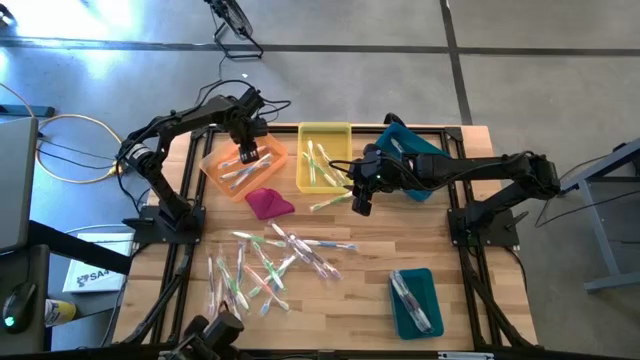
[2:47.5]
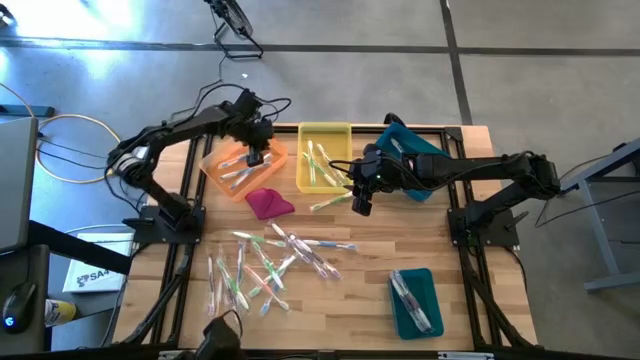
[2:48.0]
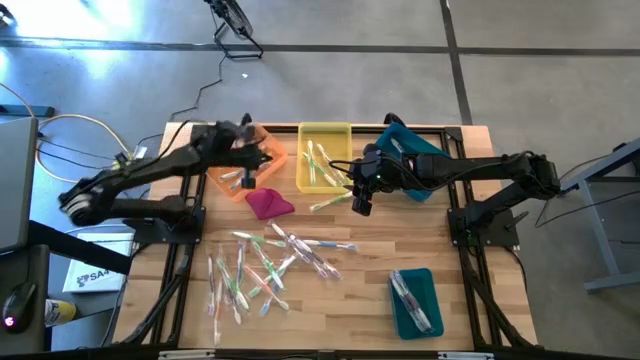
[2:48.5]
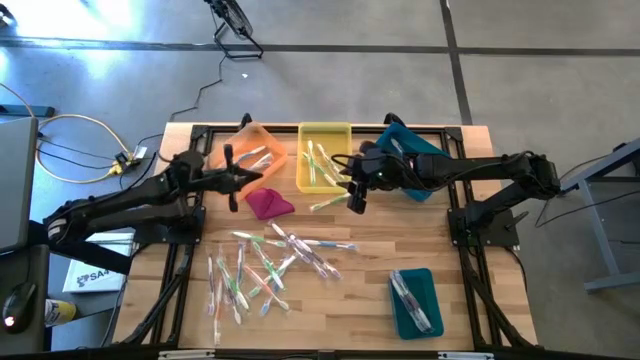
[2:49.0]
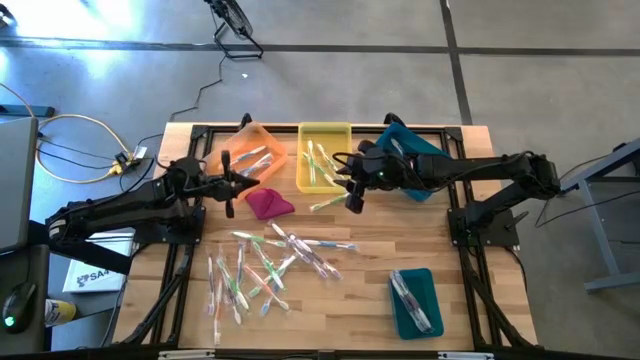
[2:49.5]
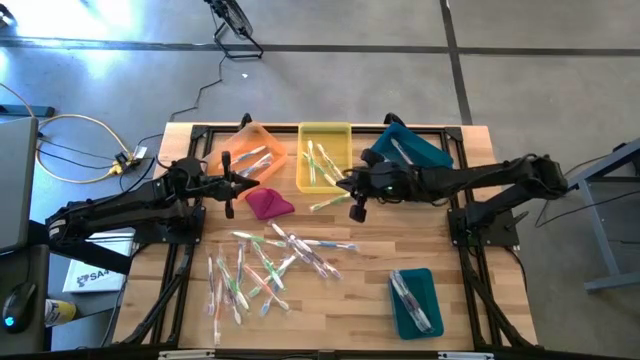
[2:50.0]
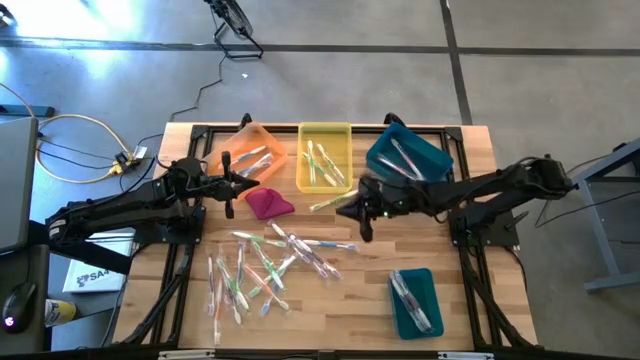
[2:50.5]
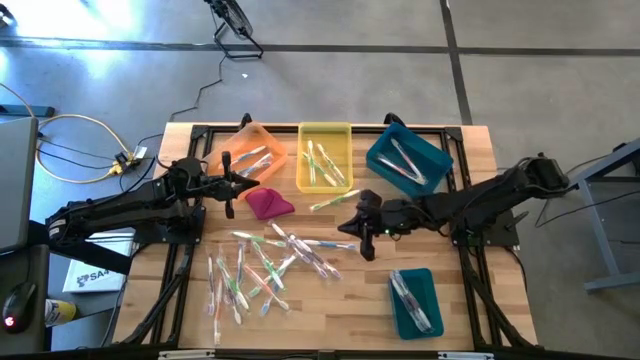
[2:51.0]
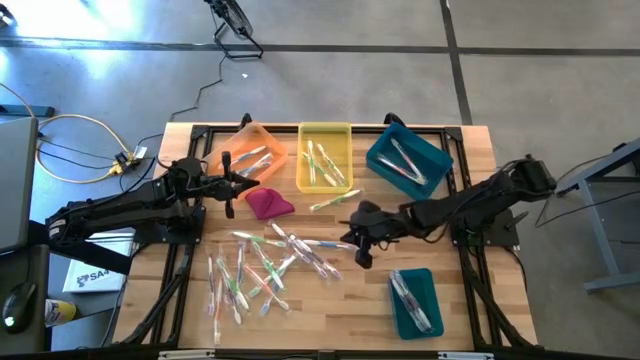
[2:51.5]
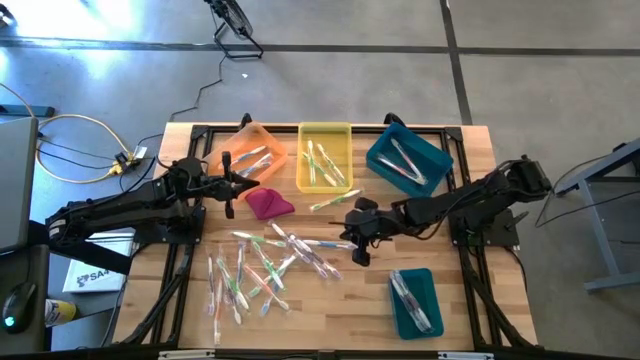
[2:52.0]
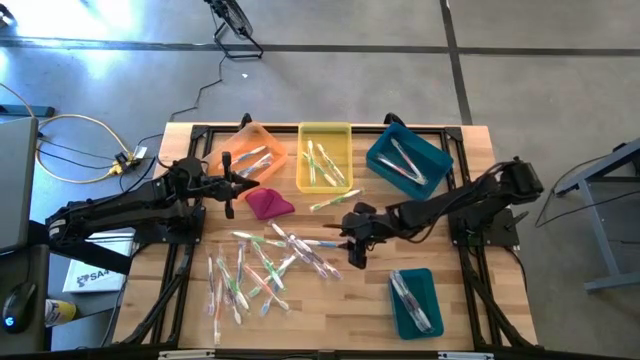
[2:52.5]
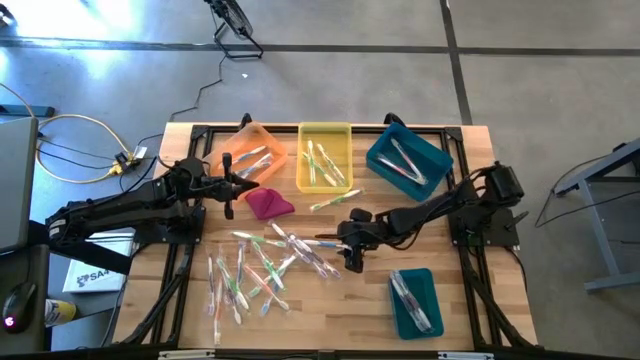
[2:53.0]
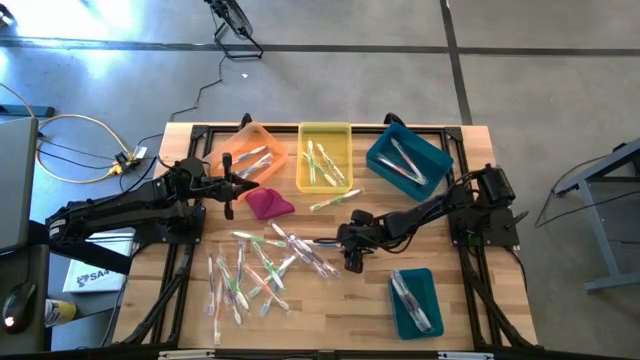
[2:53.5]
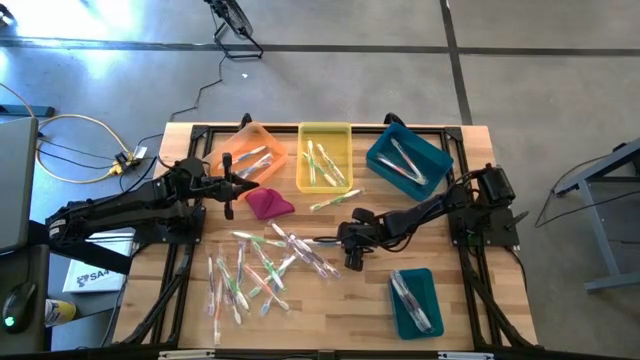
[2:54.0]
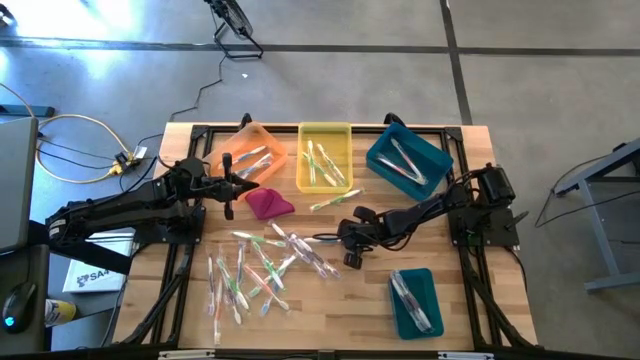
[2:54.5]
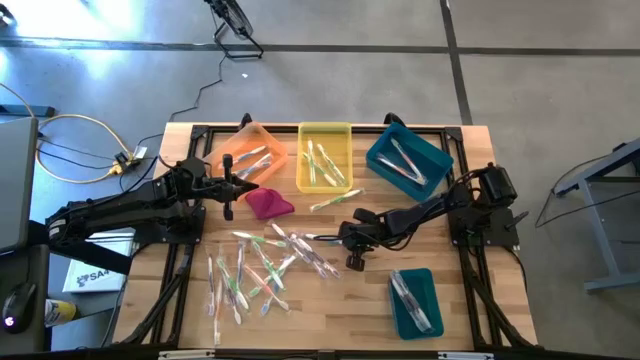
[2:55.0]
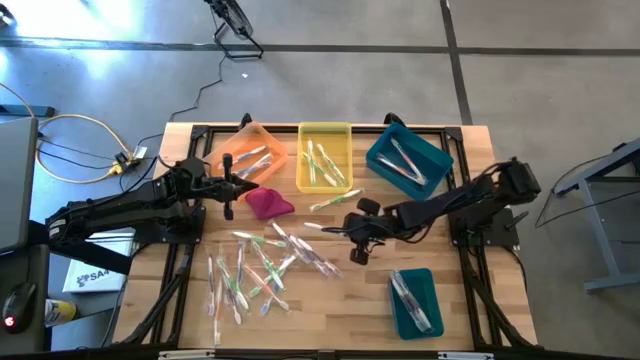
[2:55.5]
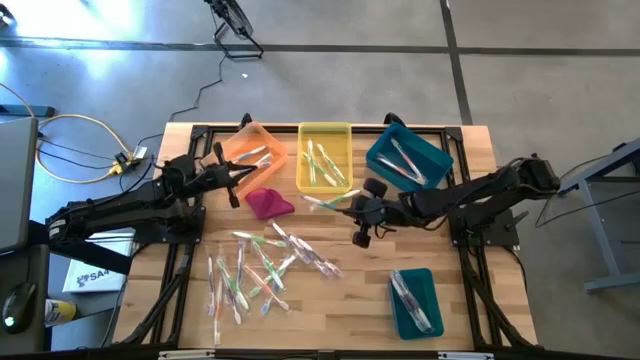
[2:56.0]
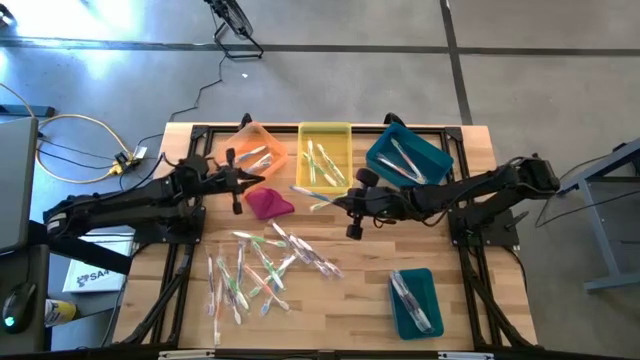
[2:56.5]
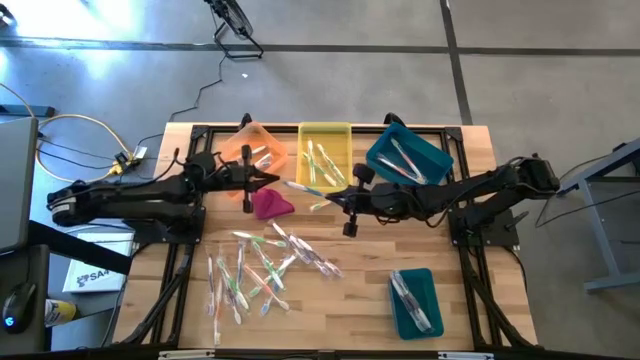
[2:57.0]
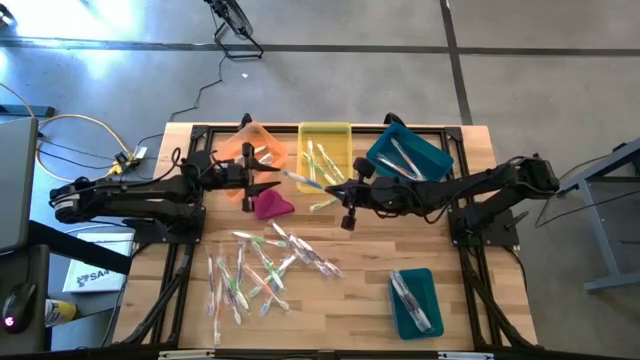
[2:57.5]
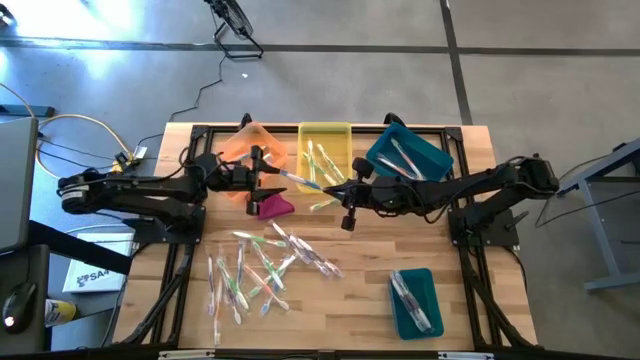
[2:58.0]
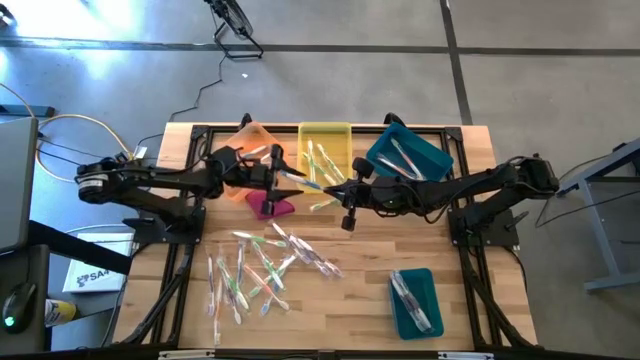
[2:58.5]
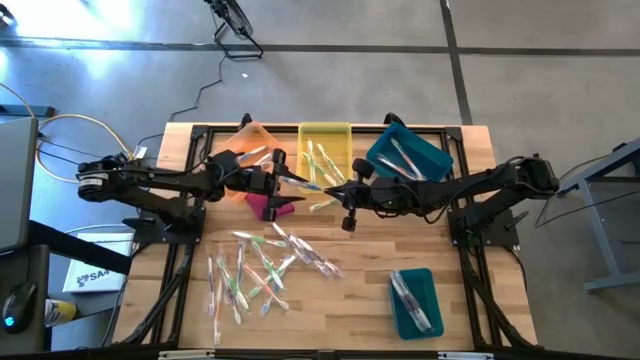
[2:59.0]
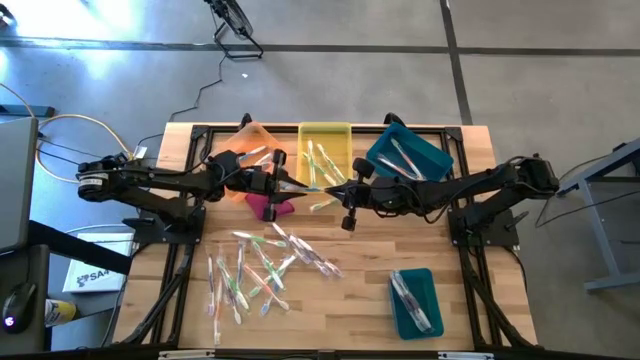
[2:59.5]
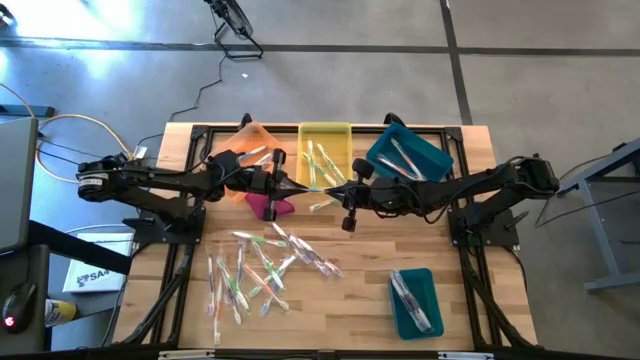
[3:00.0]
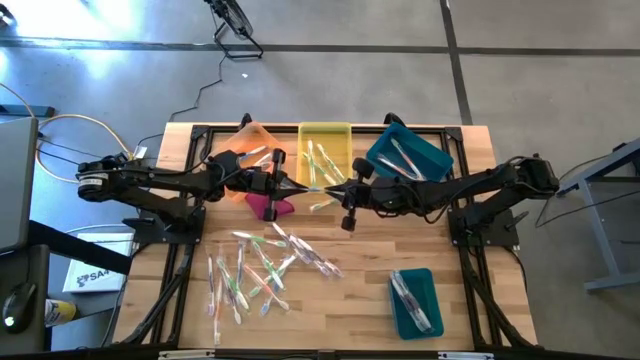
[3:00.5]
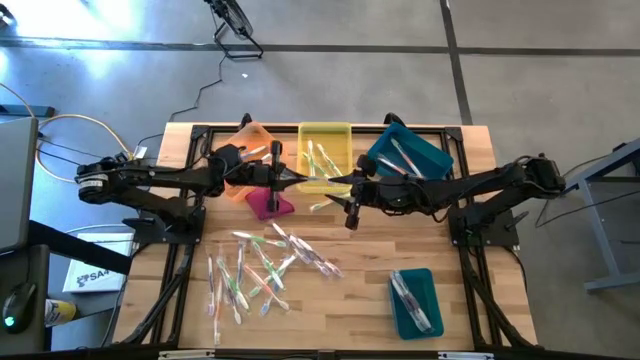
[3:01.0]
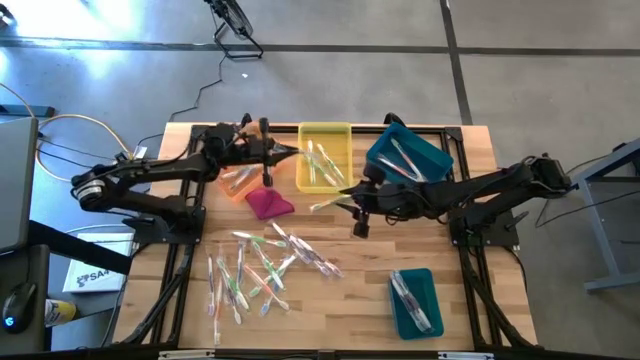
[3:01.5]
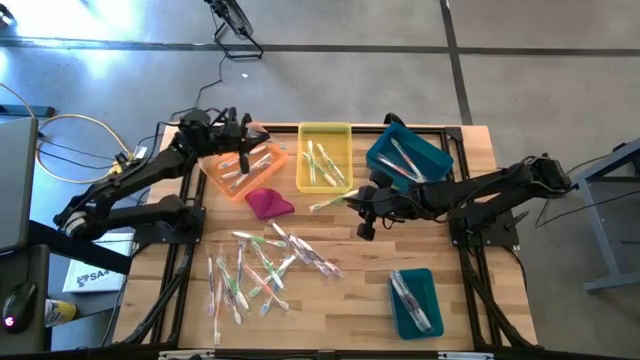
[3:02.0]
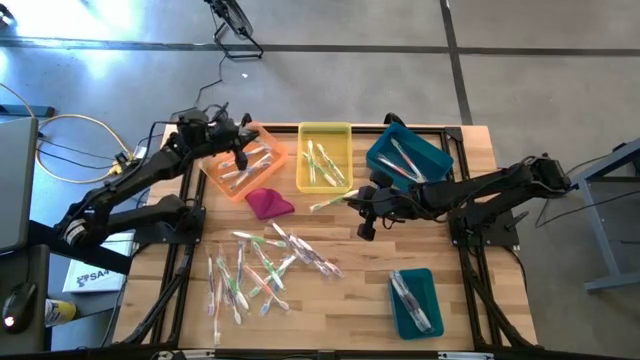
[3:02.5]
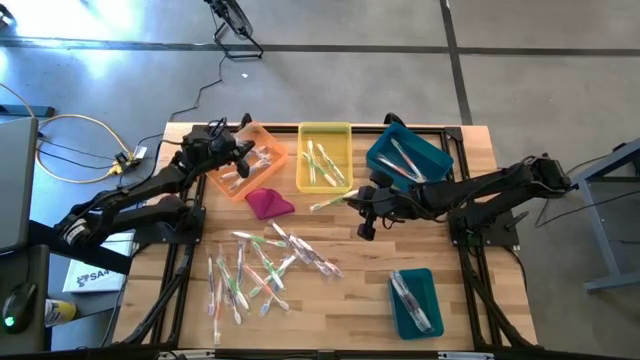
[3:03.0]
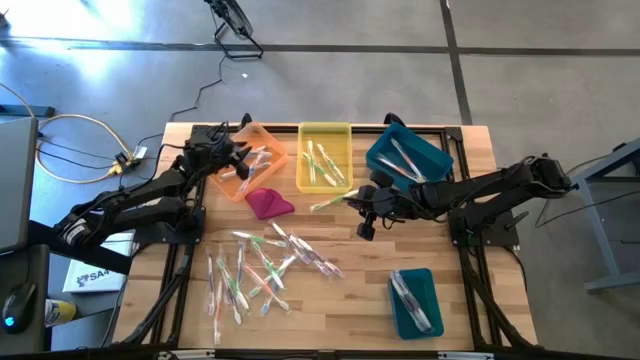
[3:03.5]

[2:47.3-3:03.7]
Task: Pick & Place Toothbrushes
Put the blue toothbrush into the orange bin

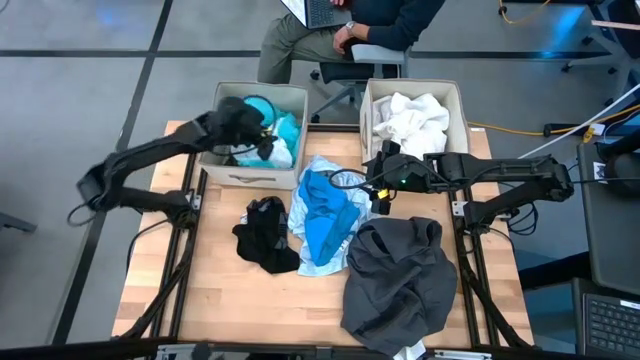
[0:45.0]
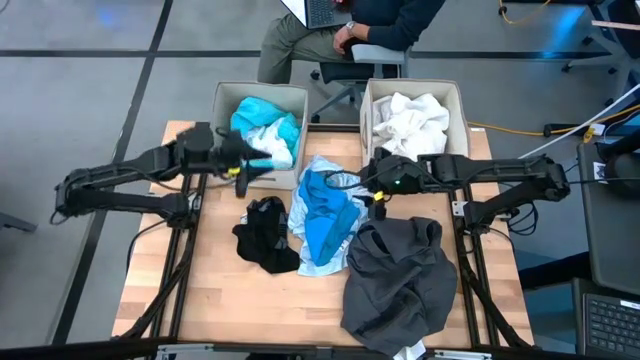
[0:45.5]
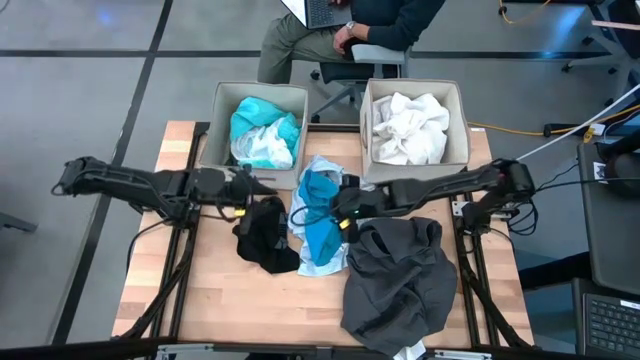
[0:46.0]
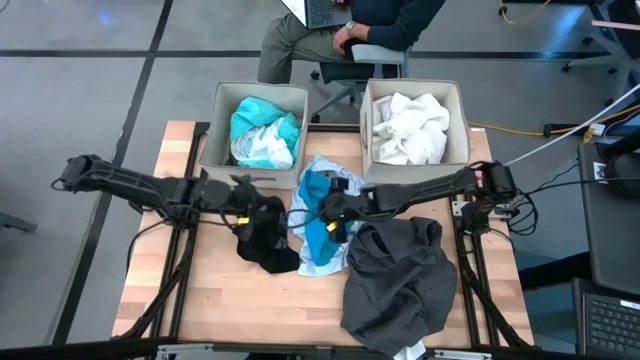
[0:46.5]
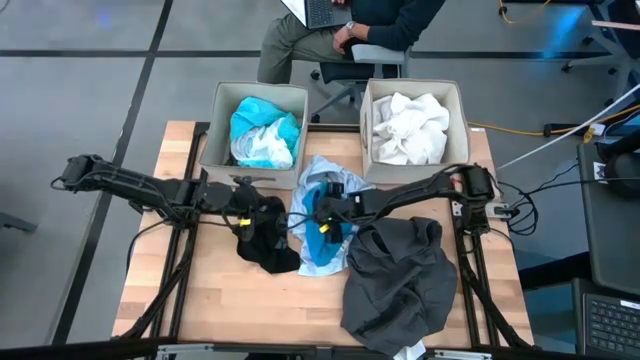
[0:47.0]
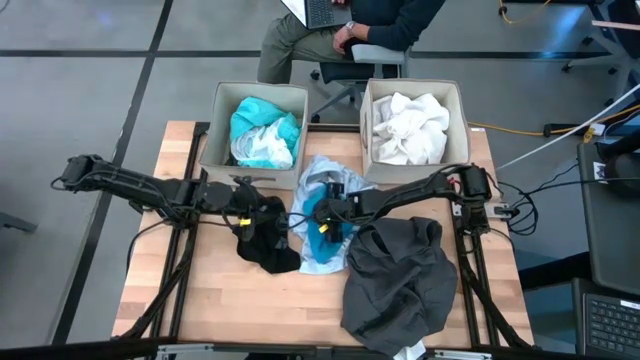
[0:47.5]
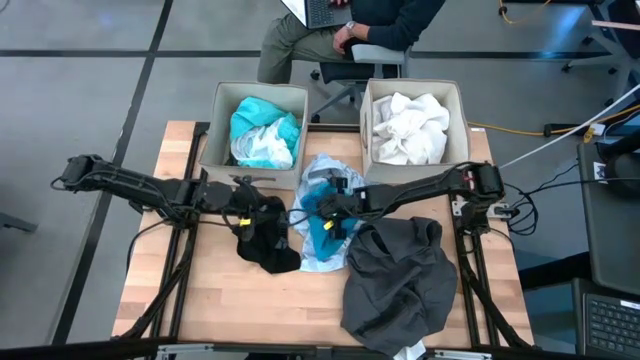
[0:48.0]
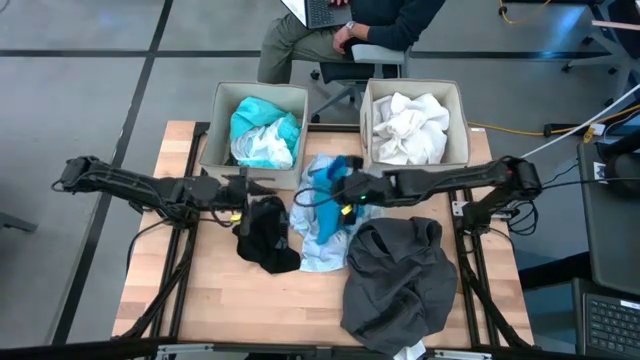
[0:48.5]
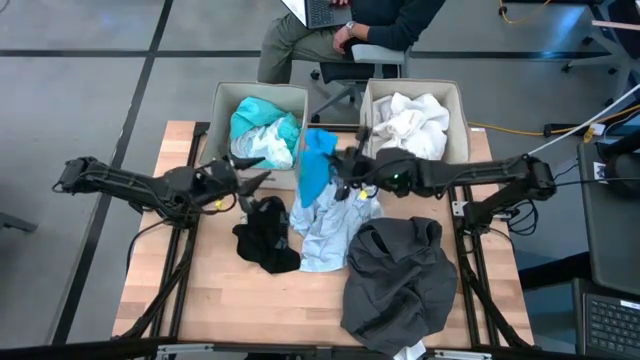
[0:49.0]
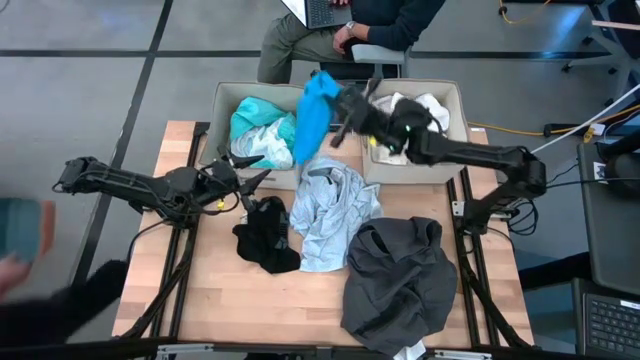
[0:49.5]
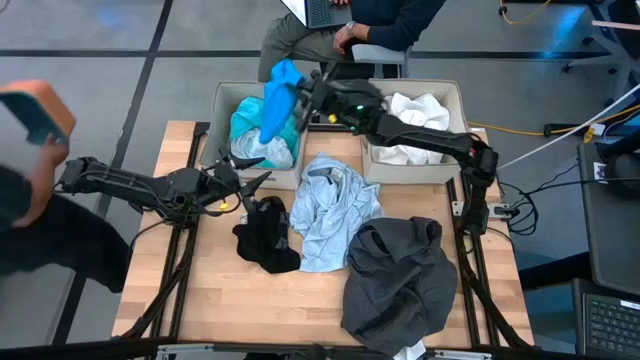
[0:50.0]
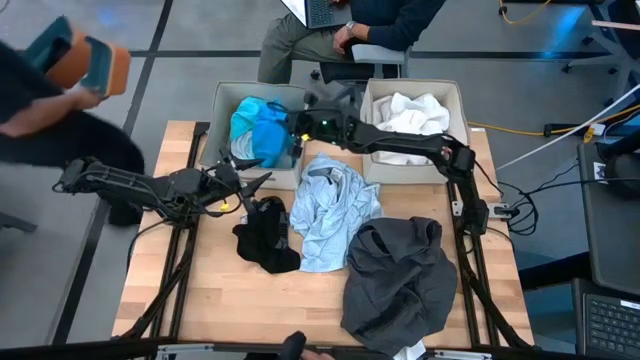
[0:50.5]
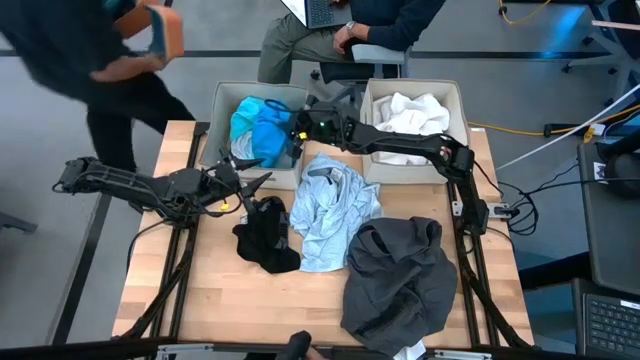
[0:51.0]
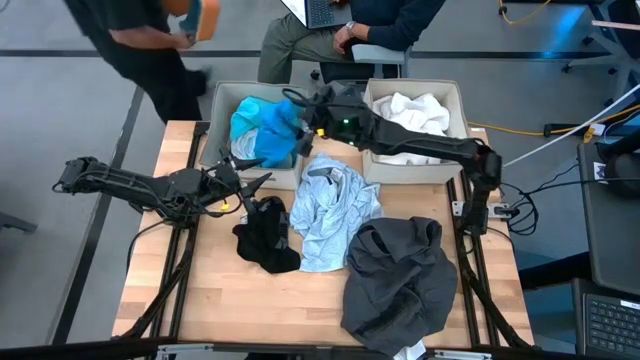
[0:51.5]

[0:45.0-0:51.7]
Task: Sort clothes
Put the blue shorts into the left laundry organizer
